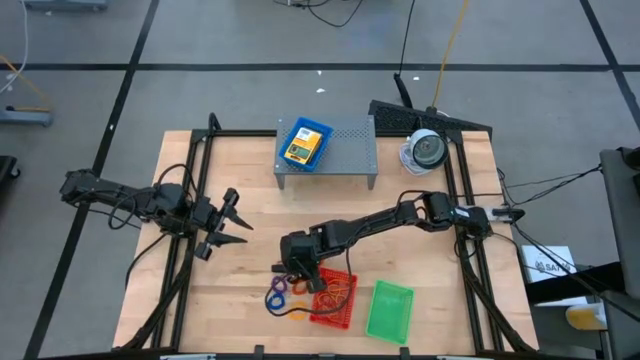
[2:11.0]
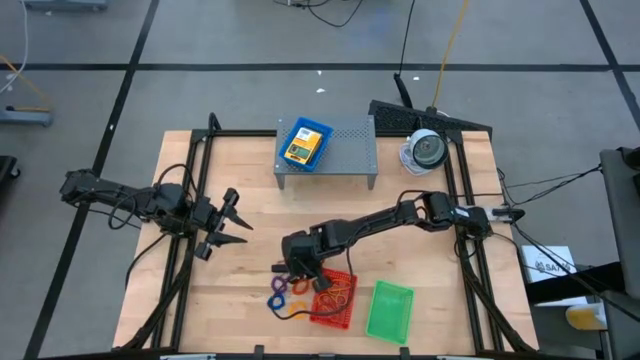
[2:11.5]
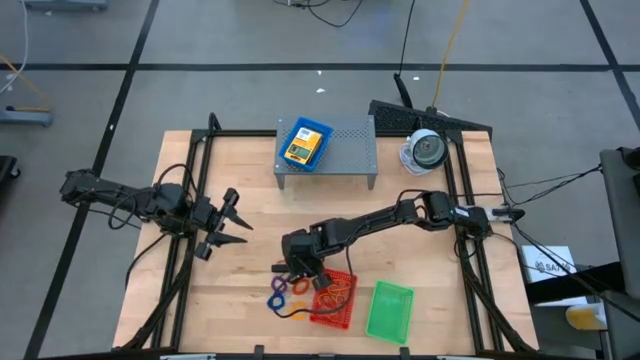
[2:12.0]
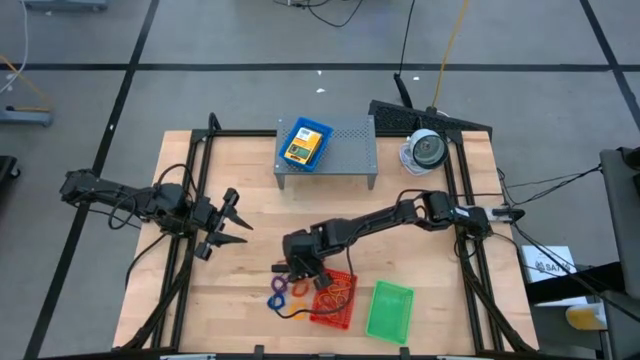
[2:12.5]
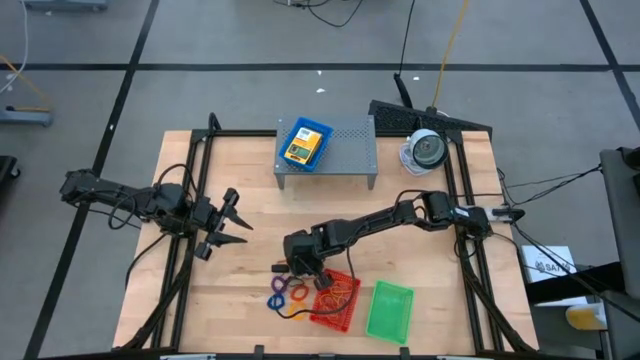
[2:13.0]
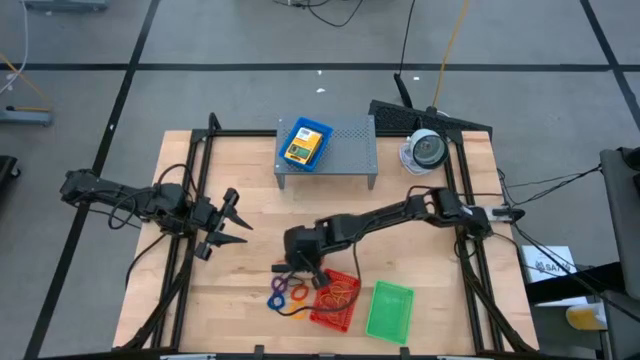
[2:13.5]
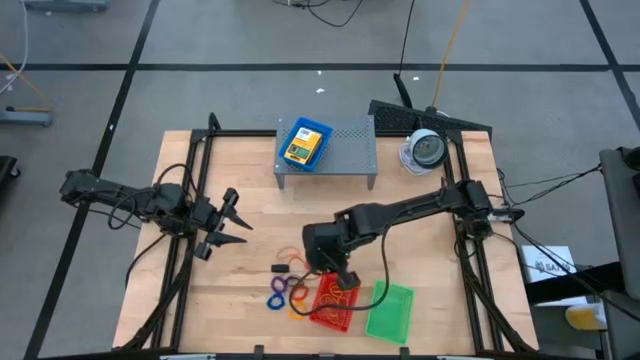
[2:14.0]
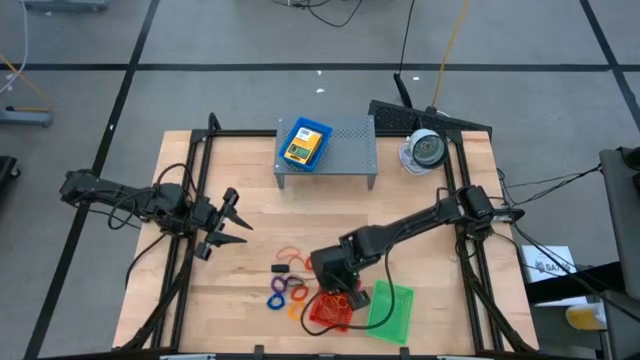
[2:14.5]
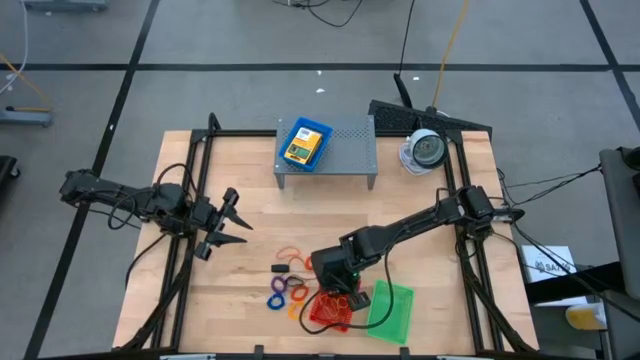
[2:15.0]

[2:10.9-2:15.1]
Task: Pick & Place Office Desk Supplies
Put the black rubber band into the red bin

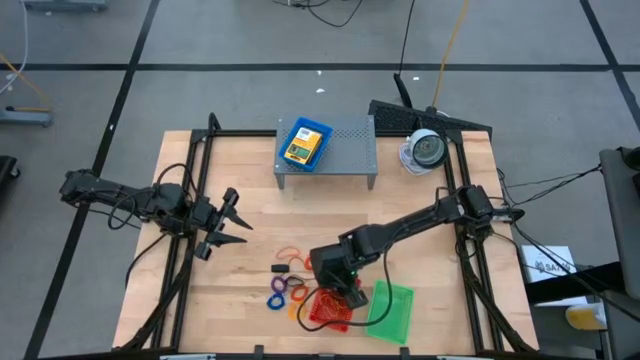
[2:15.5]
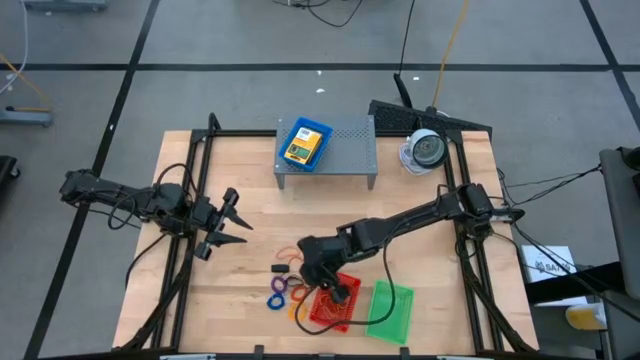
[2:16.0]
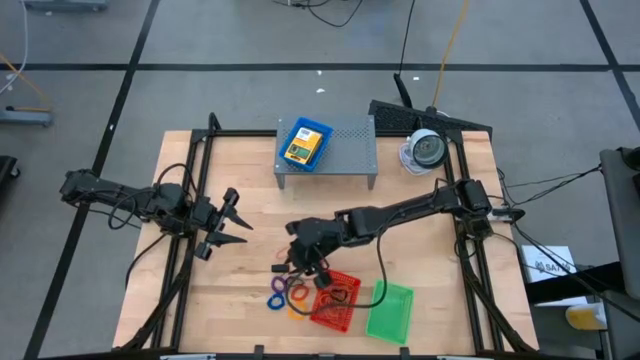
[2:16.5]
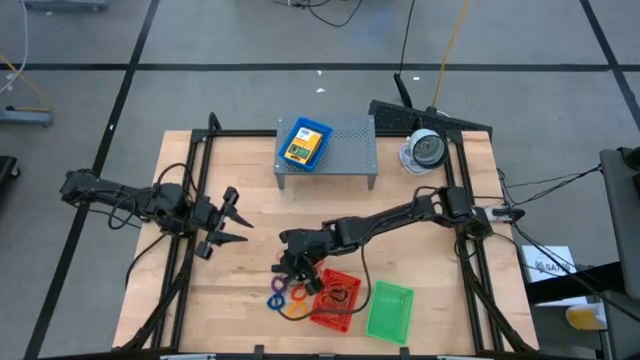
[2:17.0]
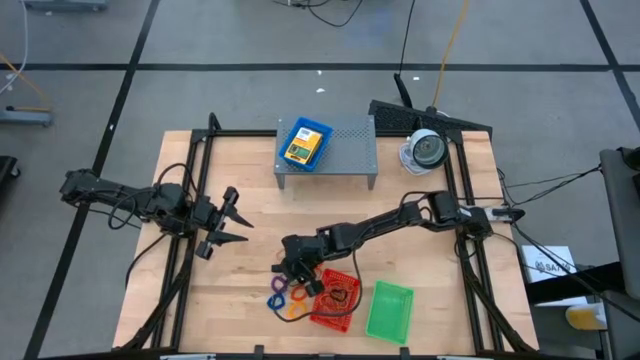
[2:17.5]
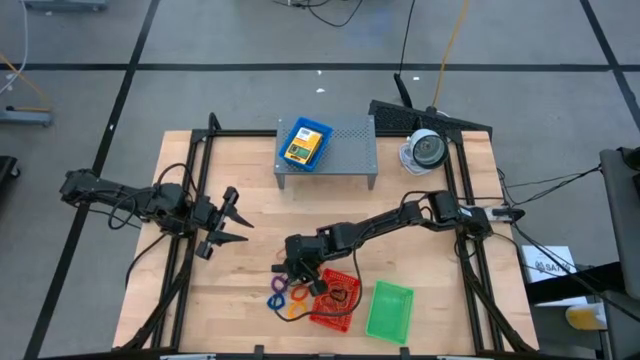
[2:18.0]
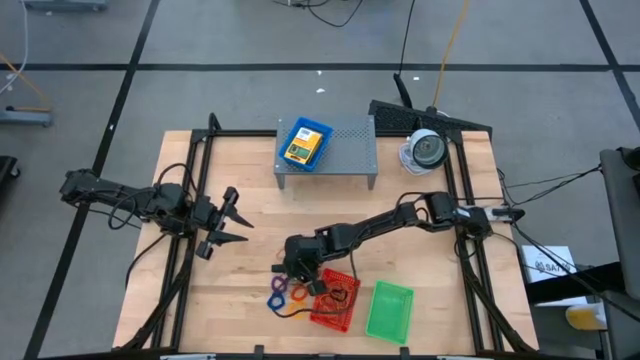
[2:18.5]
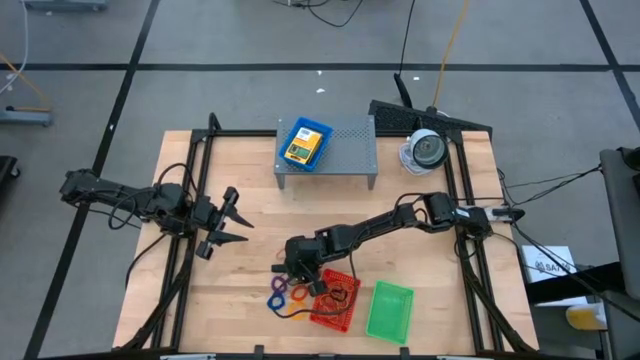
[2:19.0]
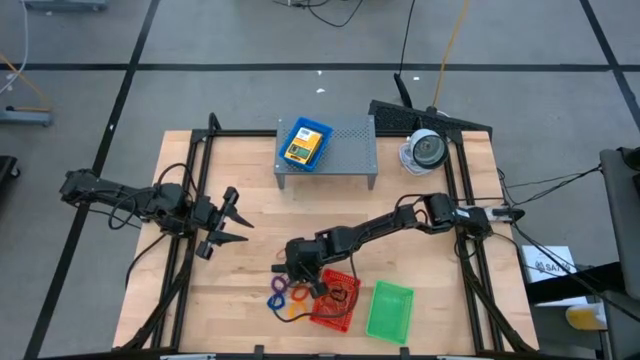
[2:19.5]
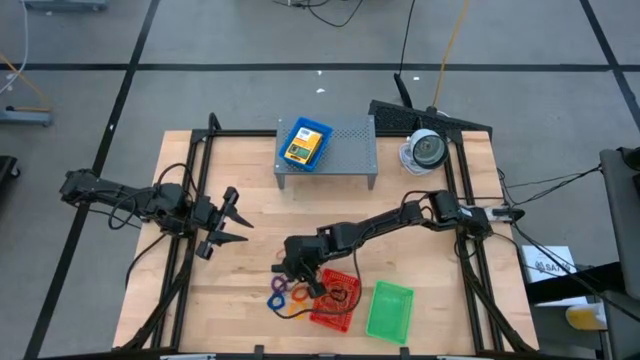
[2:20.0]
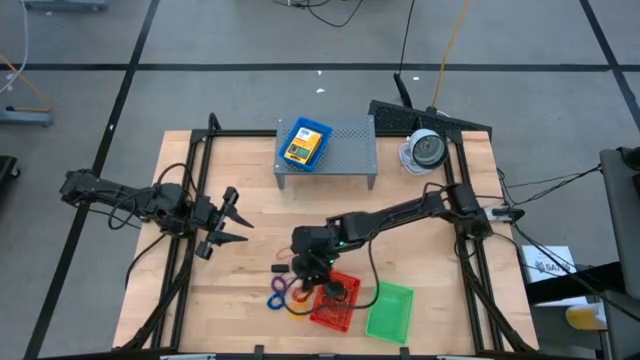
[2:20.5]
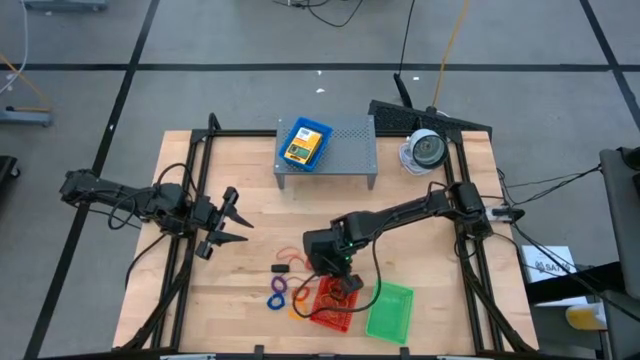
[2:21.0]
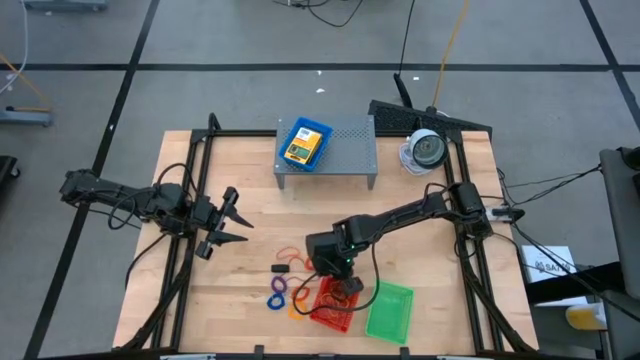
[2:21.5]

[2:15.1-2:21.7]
Put the black rubber band into the red bin

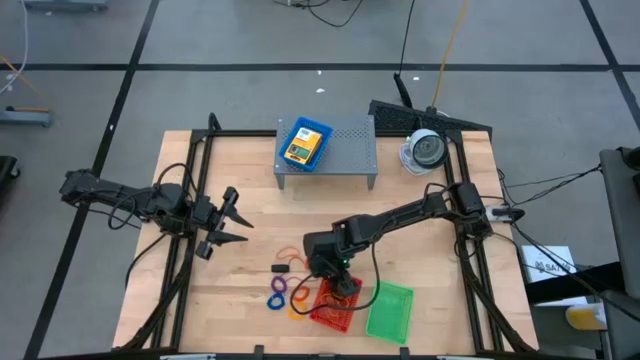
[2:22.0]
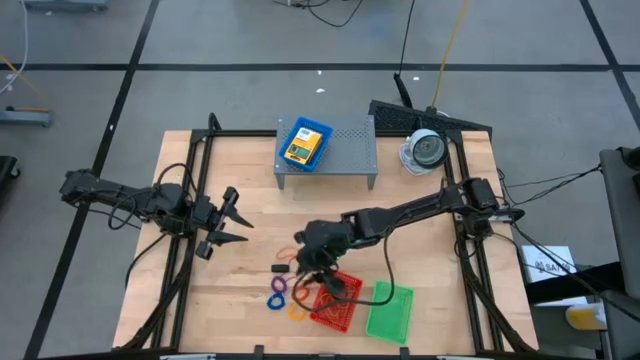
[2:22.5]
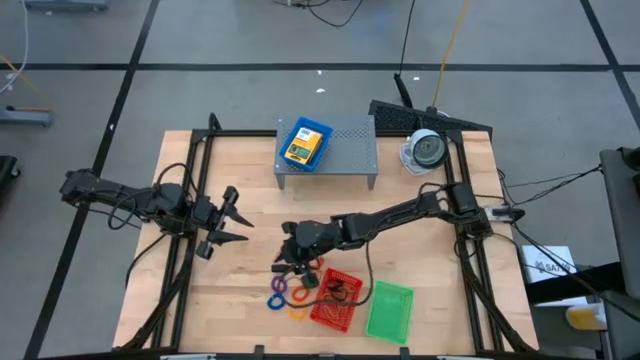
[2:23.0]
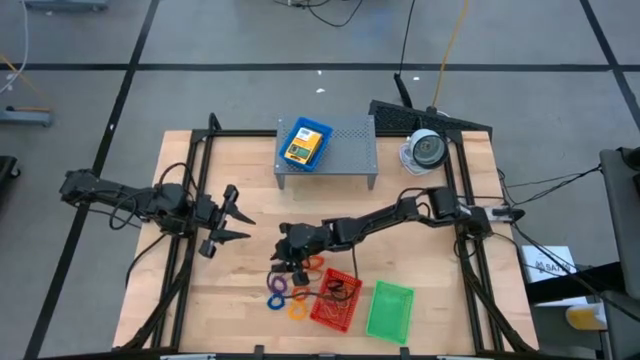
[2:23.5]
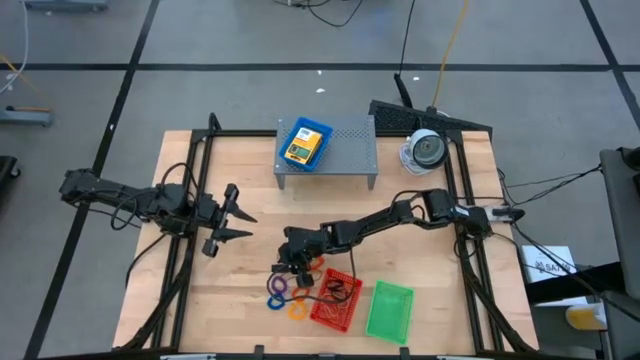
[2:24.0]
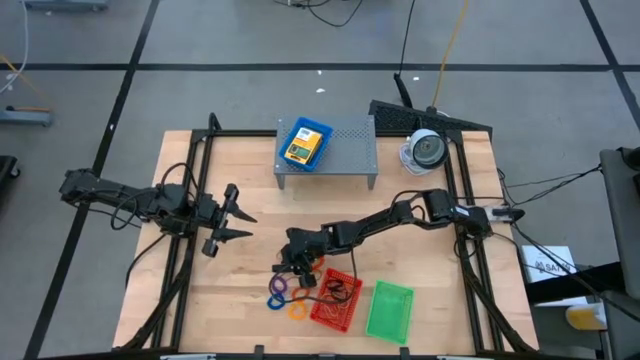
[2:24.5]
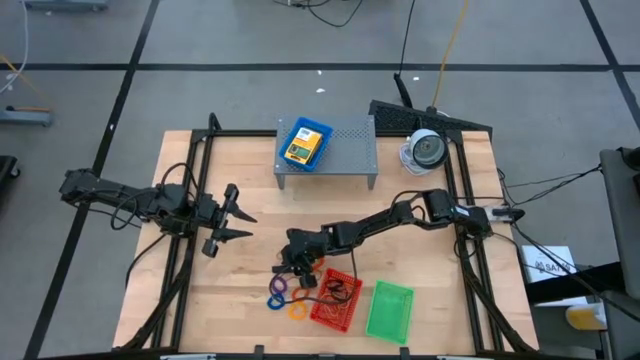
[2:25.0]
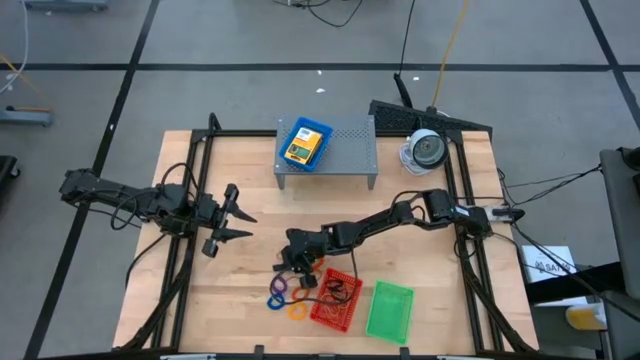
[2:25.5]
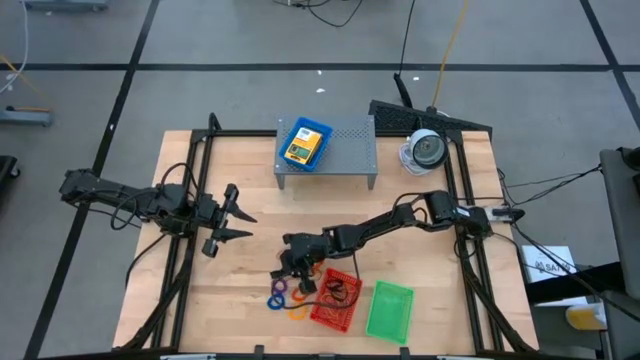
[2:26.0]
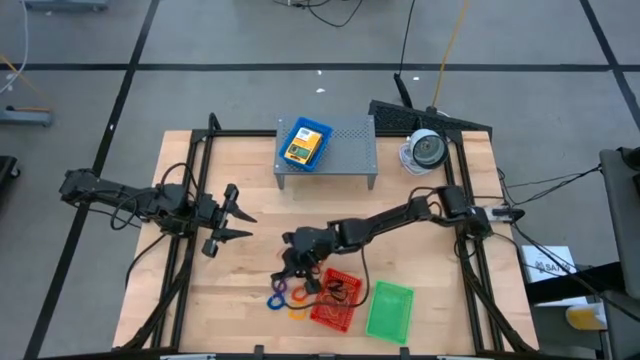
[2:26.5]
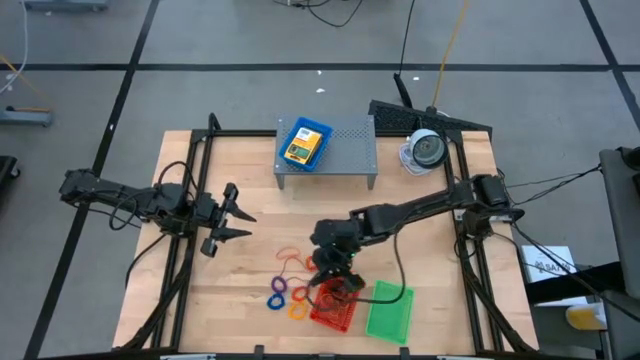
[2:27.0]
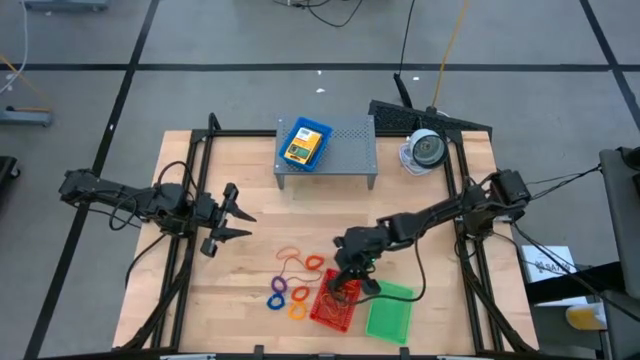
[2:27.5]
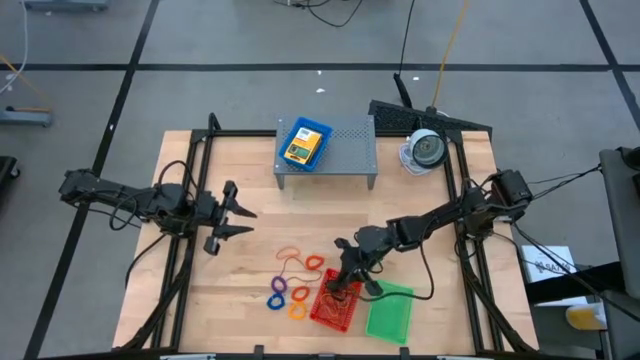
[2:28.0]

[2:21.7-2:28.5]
Put the black rubber band into the red bin

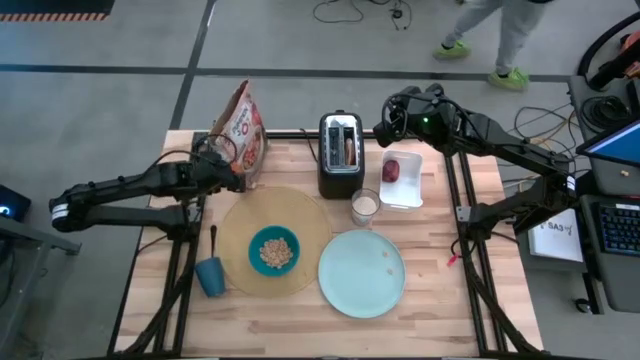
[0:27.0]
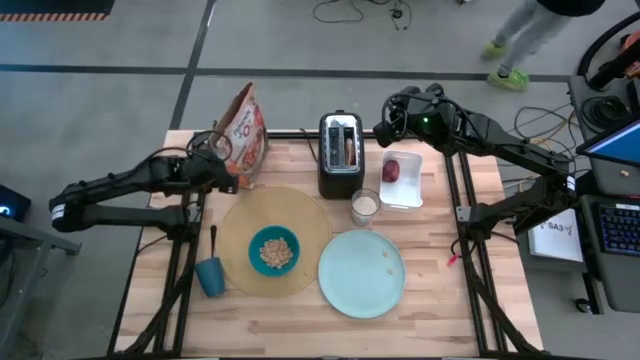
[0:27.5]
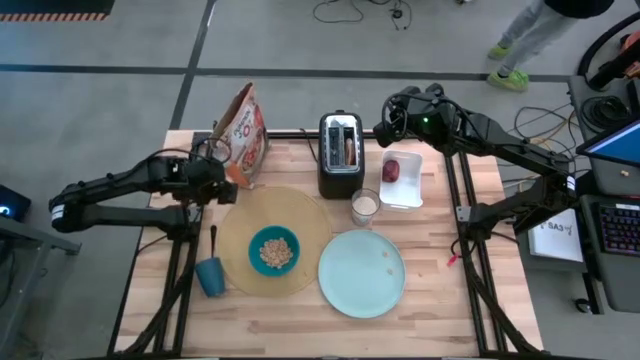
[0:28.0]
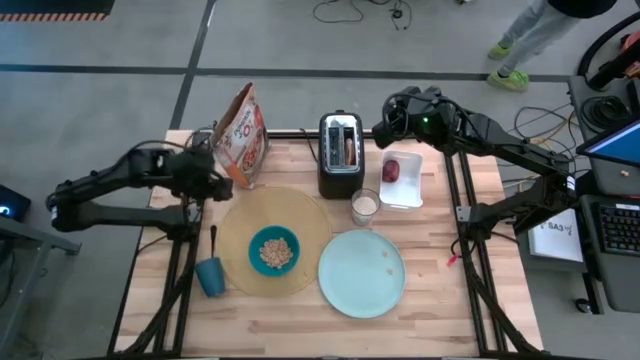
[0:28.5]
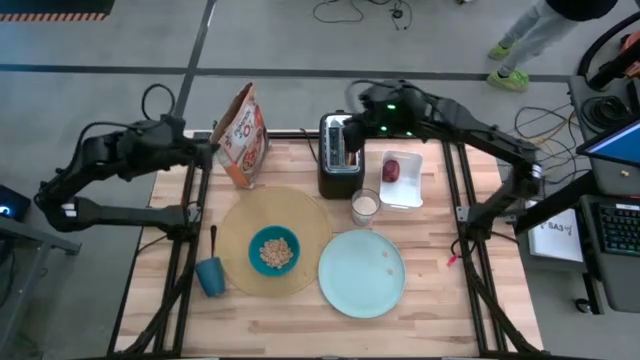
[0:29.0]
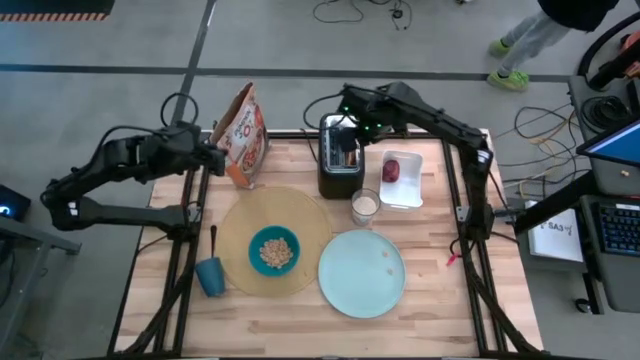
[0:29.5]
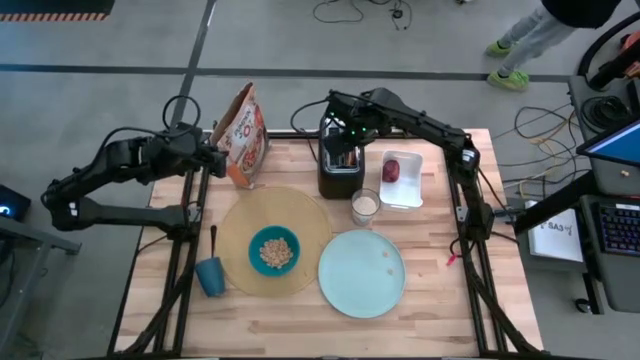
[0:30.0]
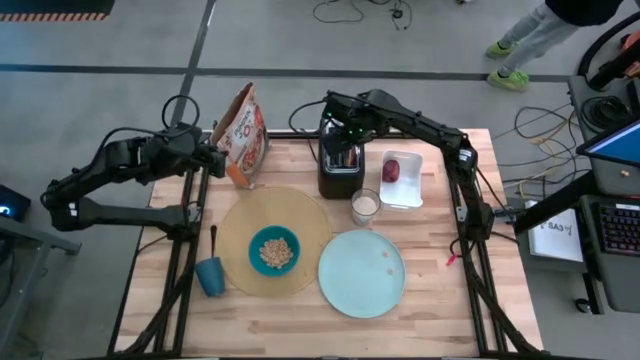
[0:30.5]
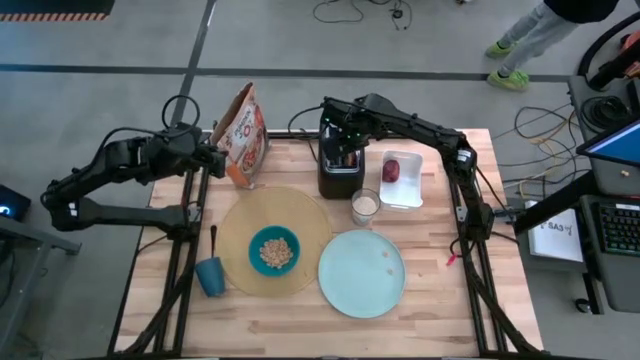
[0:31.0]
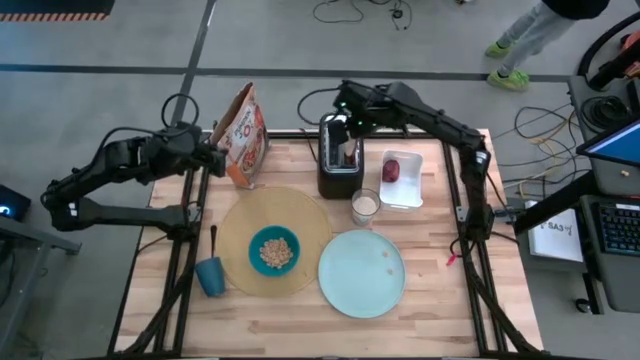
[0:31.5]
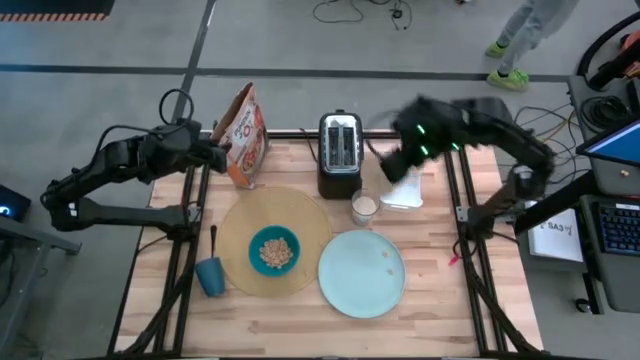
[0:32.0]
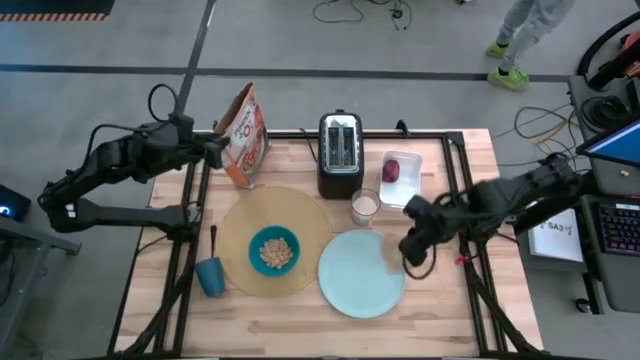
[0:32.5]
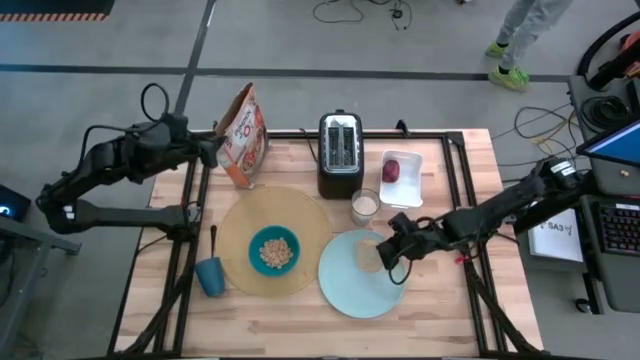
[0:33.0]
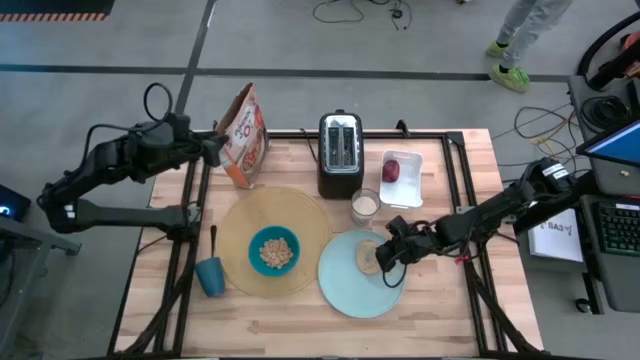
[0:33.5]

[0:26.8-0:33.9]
Task: Arrange a breakfast setting
Put the bagel from the toaster on the light blue plate
